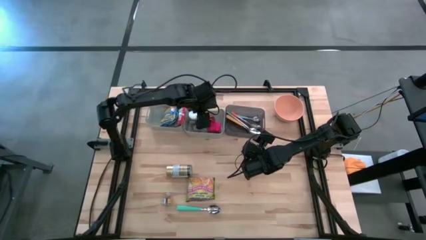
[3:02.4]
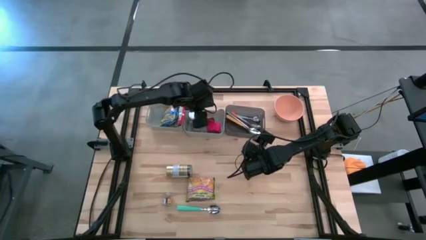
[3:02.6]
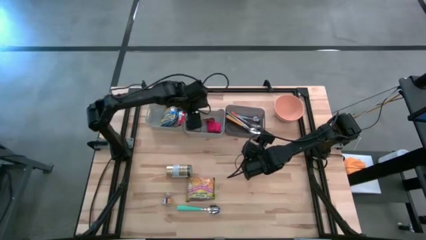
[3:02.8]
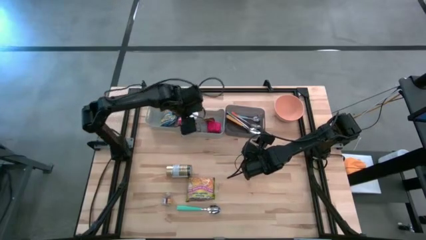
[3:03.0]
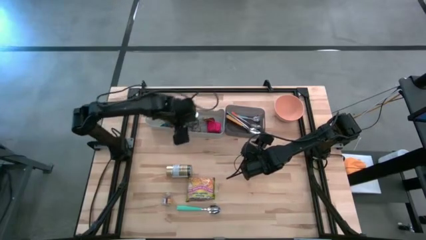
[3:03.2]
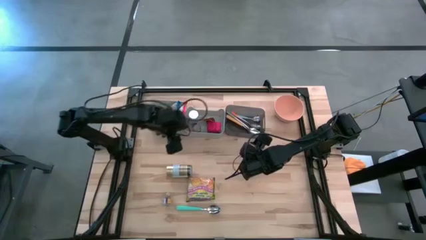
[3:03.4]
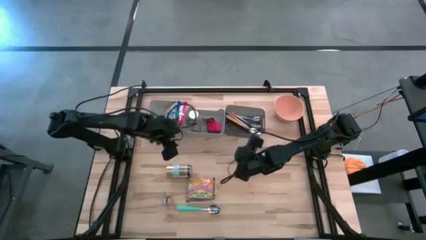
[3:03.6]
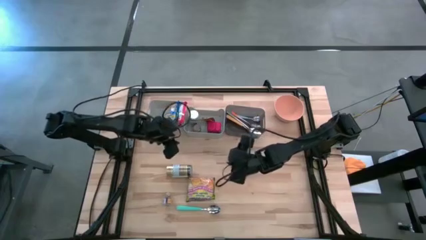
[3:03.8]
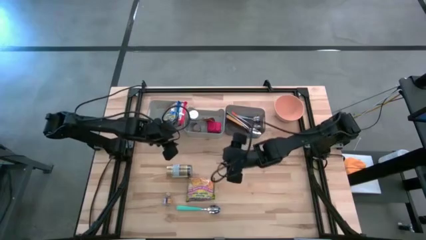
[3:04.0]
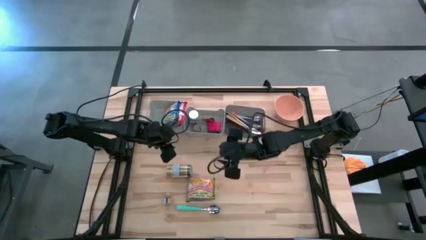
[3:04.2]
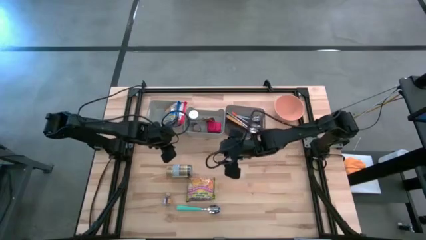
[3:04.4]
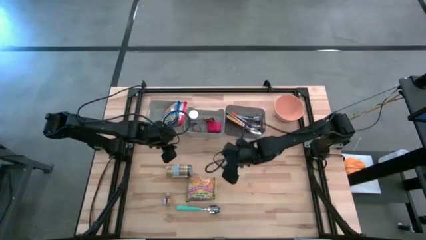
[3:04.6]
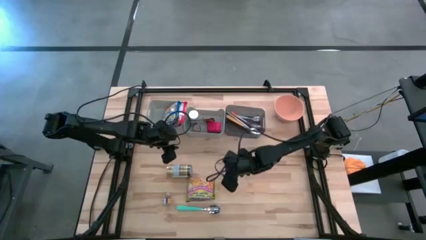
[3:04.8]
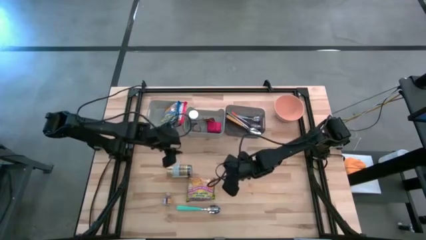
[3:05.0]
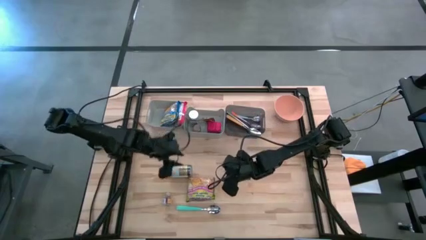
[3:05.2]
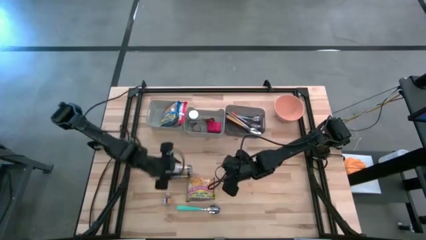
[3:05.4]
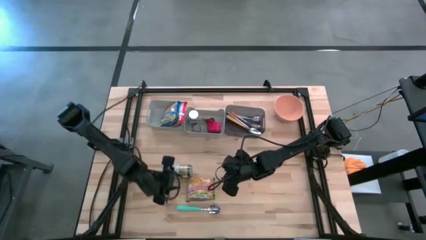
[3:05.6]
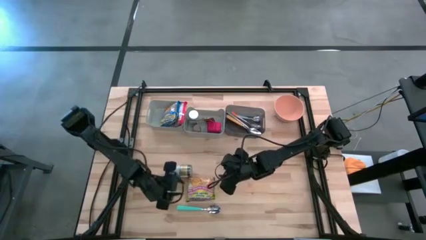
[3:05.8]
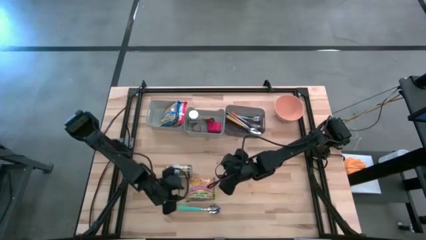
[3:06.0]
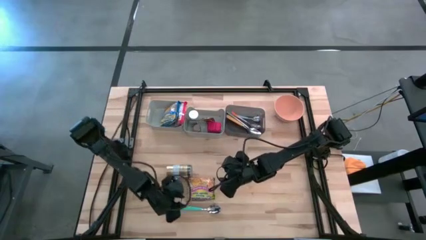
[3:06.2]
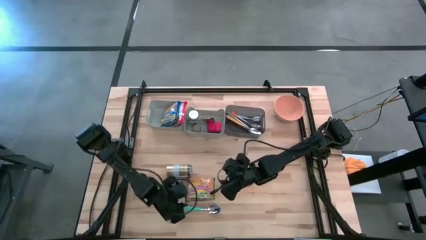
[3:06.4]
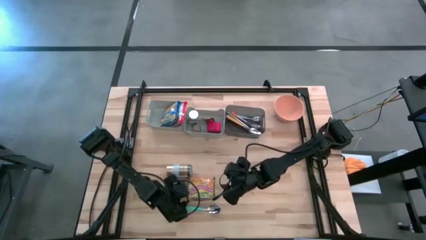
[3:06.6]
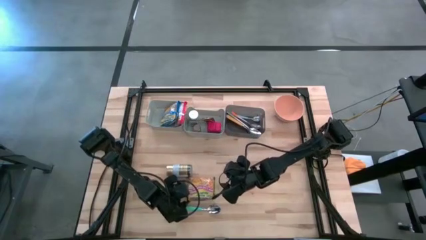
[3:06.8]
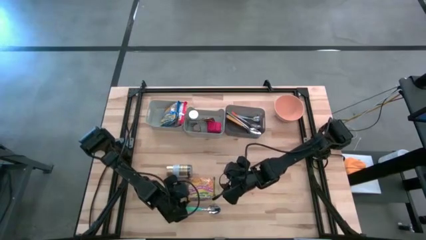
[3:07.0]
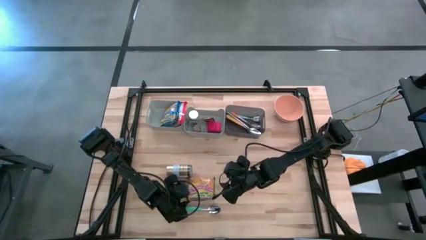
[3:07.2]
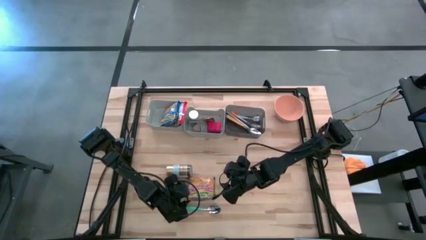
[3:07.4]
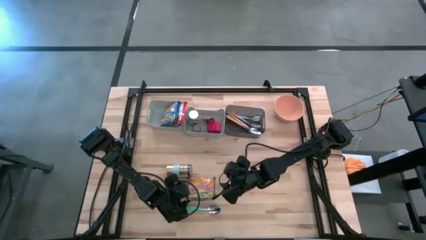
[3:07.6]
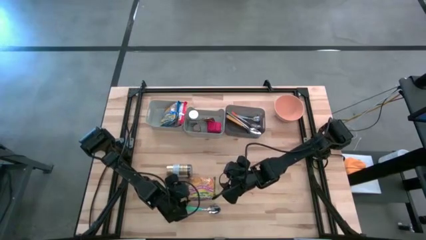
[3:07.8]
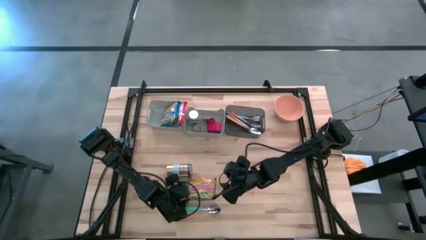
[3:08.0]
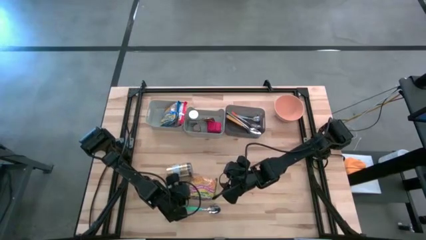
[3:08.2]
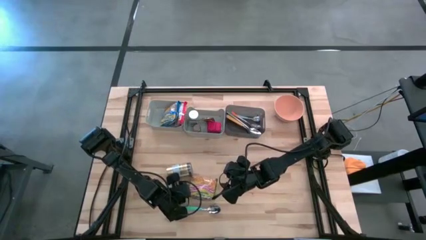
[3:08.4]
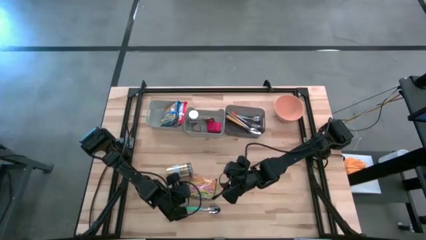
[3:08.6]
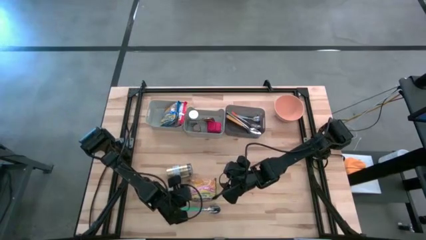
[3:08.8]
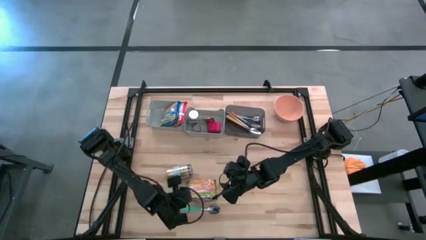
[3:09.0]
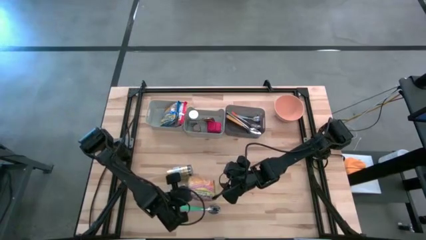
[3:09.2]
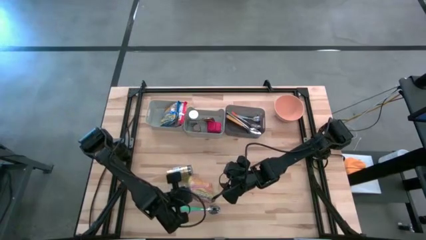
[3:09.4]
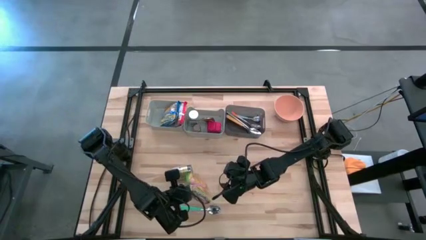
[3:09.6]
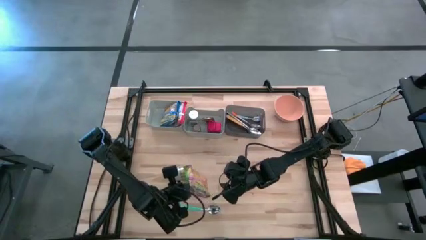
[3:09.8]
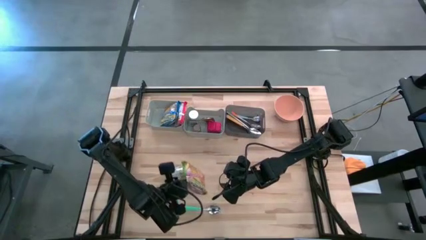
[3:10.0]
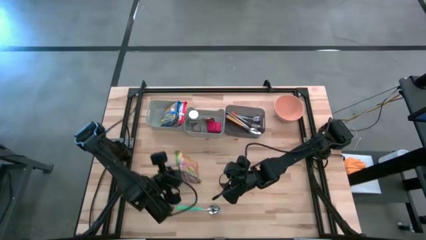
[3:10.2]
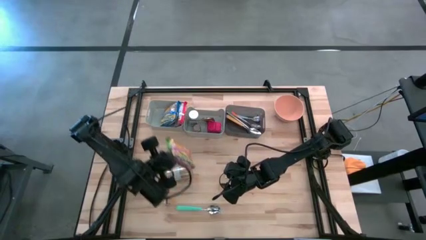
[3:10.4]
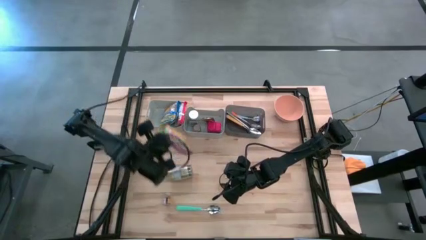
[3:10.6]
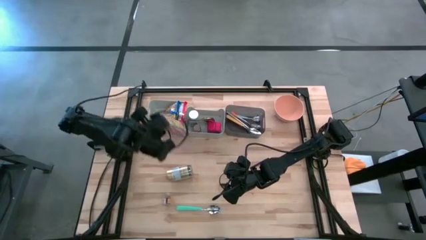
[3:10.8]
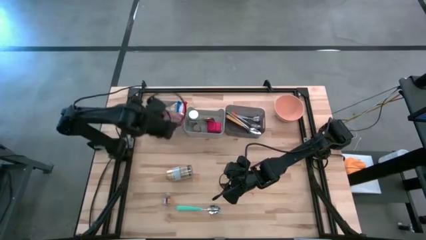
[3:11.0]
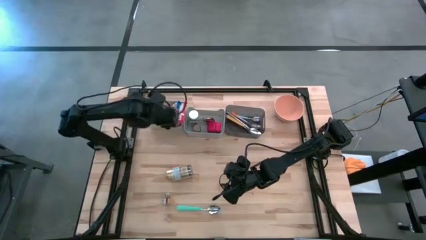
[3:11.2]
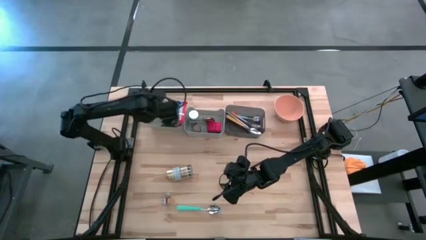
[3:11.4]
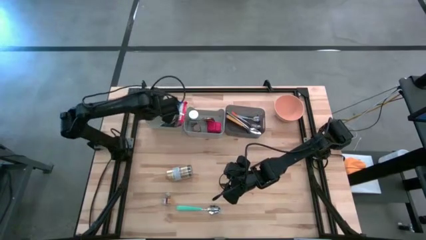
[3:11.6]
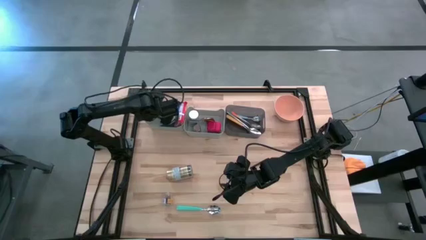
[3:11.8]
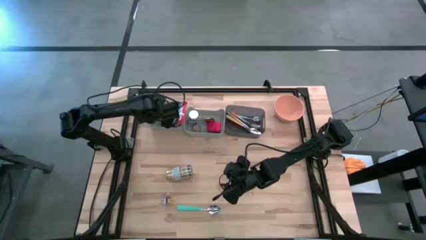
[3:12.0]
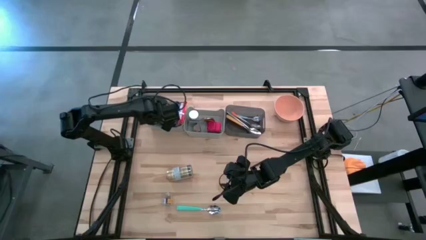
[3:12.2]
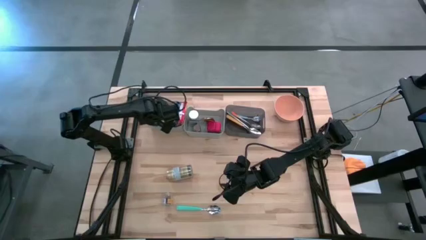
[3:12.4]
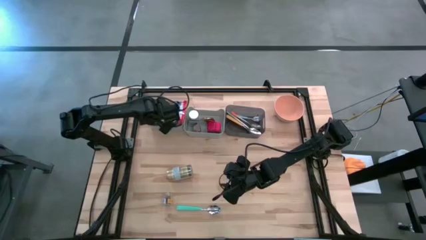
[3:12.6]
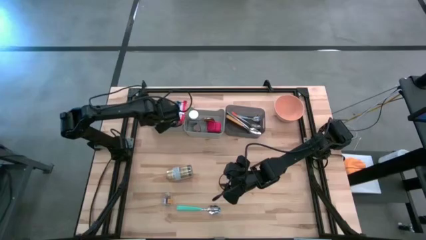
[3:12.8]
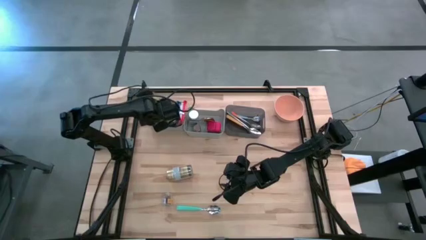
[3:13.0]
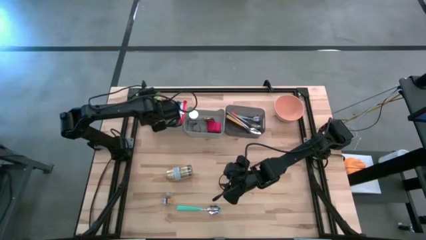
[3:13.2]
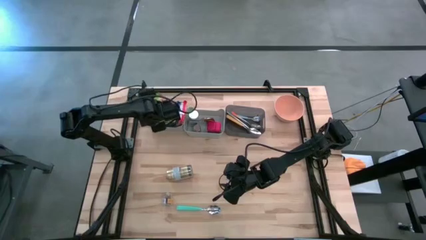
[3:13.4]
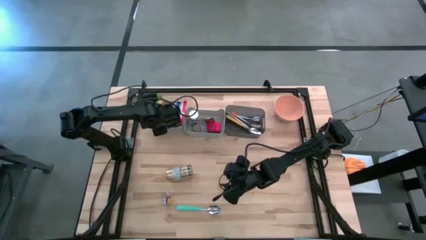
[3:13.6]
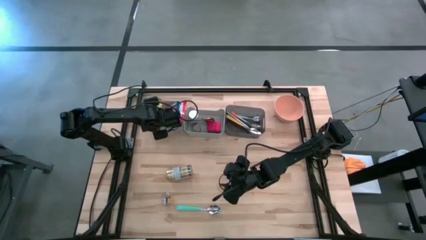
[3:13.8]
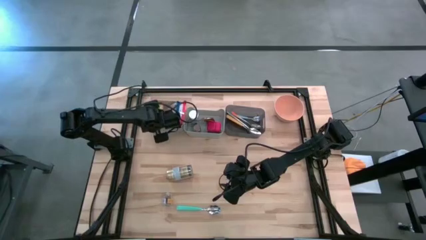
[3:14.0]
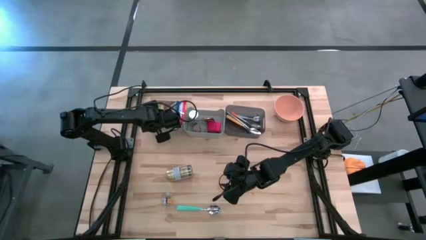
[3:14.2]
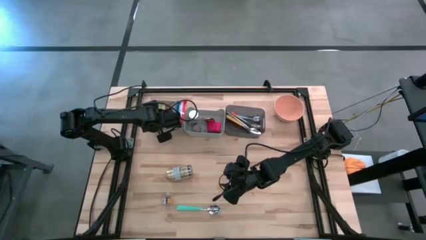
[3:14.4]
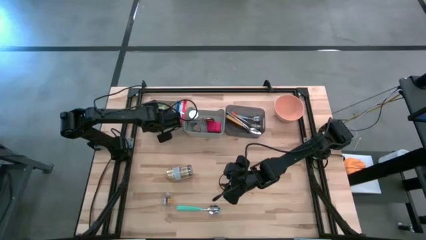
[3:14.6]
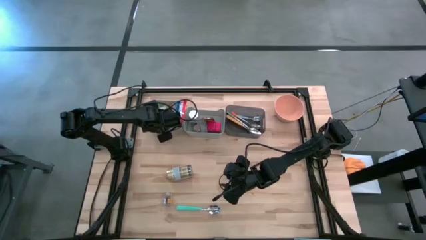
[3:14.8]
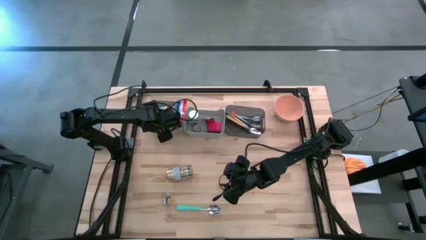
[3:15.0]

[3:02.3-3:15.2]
Put the green noodle pack into the left gray bin
